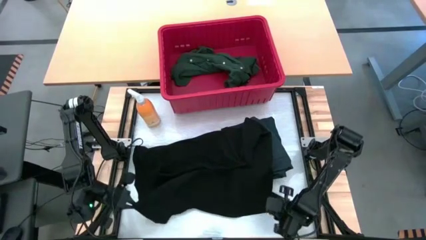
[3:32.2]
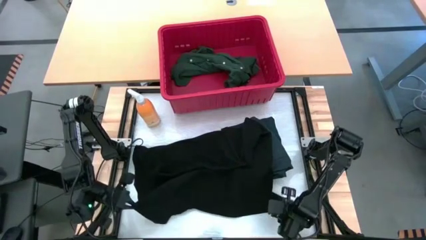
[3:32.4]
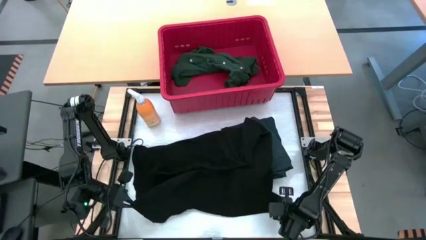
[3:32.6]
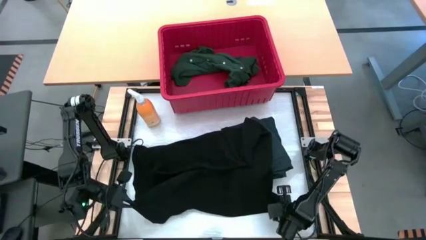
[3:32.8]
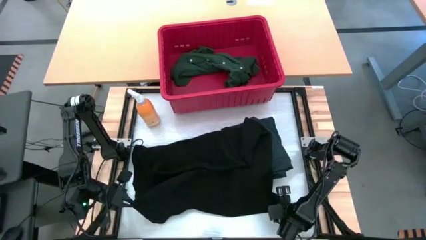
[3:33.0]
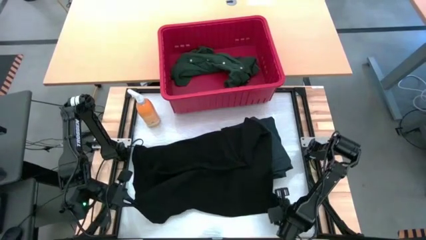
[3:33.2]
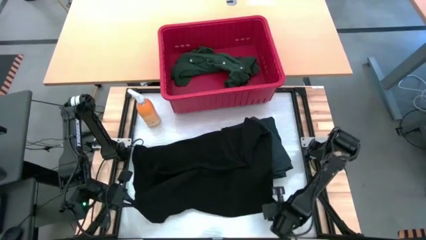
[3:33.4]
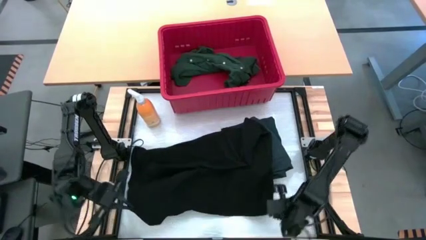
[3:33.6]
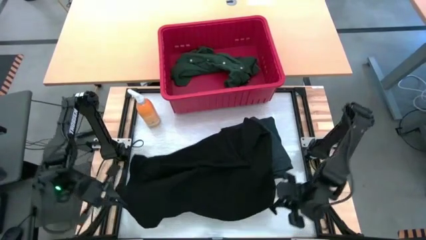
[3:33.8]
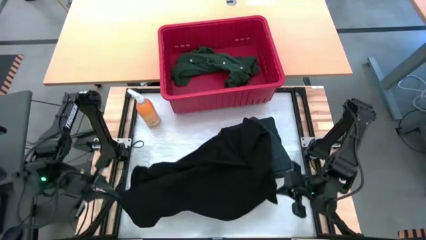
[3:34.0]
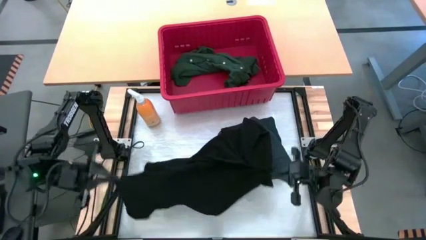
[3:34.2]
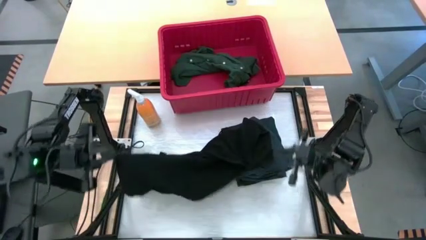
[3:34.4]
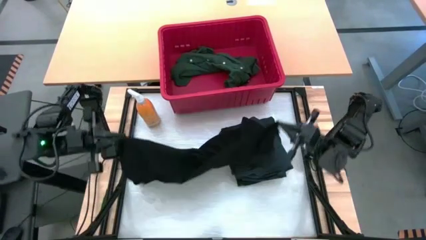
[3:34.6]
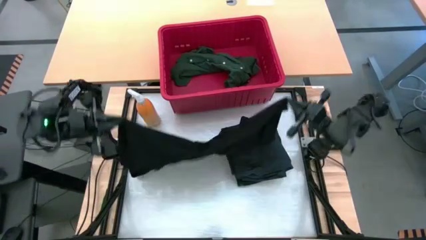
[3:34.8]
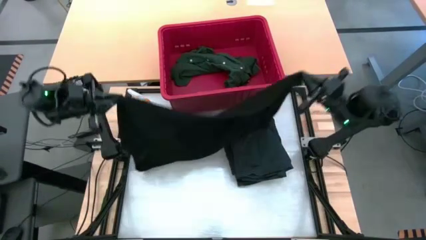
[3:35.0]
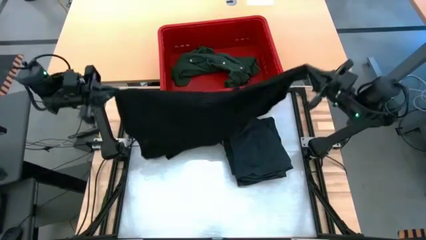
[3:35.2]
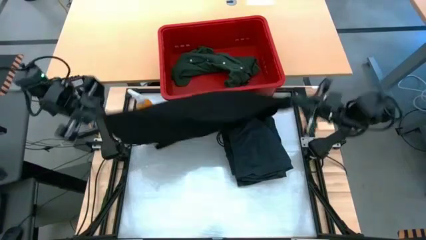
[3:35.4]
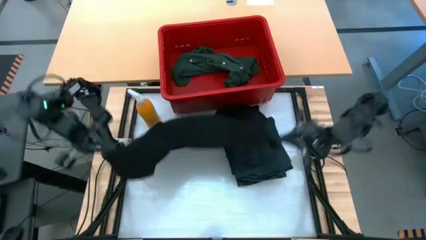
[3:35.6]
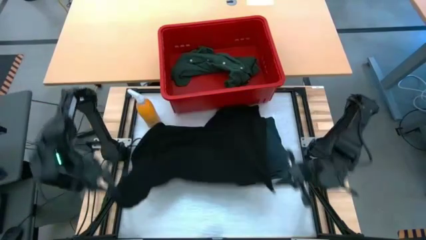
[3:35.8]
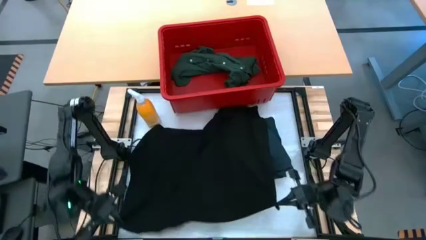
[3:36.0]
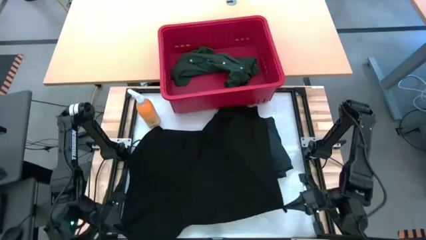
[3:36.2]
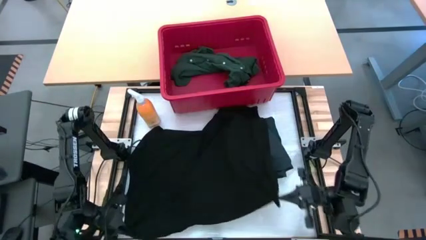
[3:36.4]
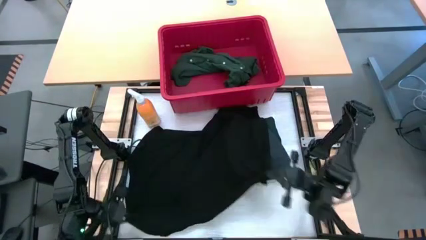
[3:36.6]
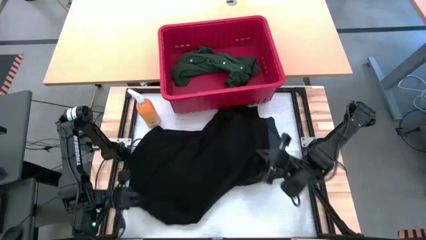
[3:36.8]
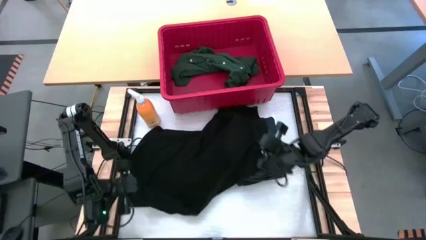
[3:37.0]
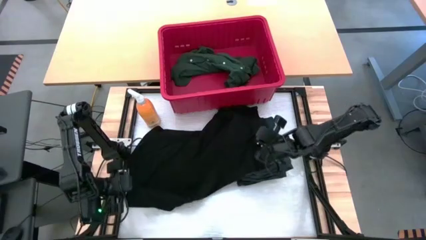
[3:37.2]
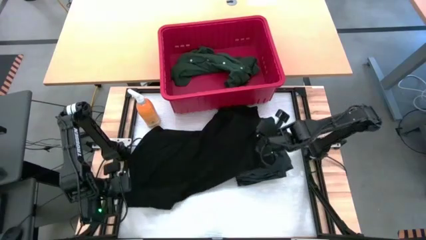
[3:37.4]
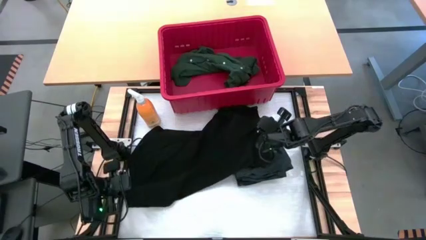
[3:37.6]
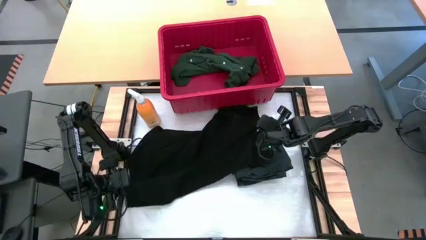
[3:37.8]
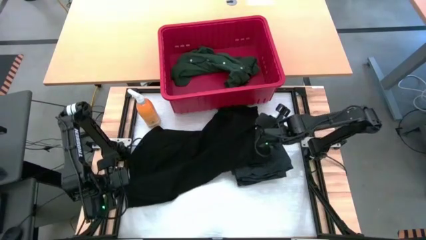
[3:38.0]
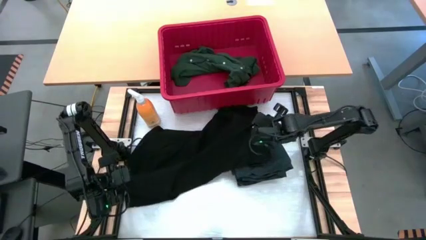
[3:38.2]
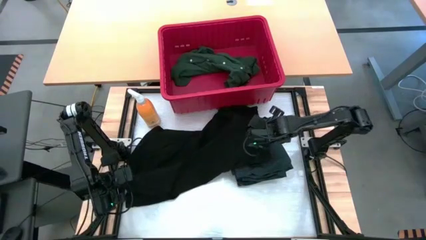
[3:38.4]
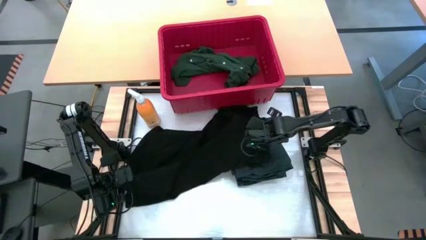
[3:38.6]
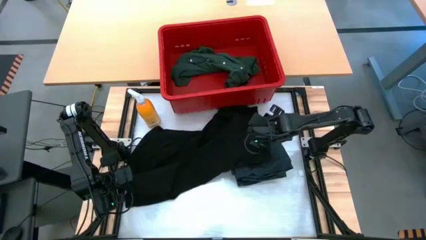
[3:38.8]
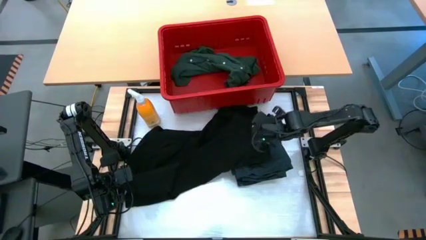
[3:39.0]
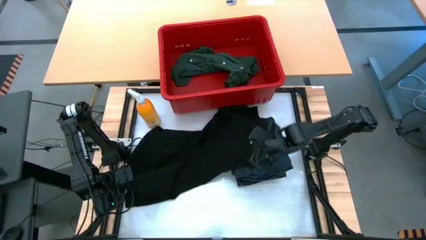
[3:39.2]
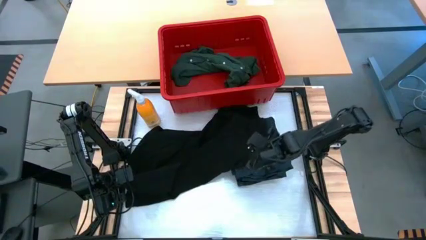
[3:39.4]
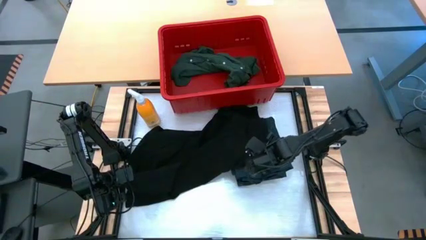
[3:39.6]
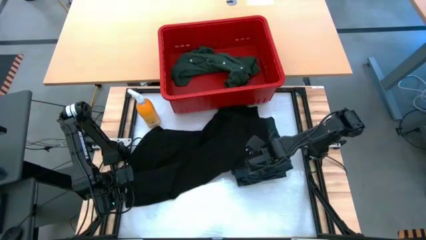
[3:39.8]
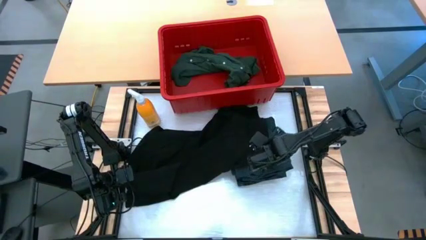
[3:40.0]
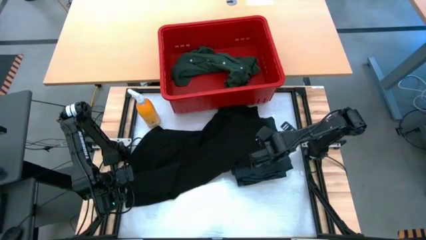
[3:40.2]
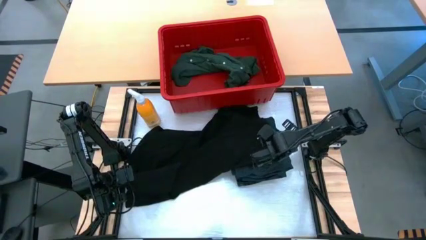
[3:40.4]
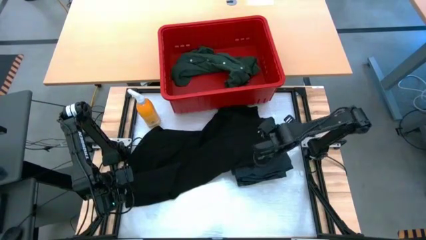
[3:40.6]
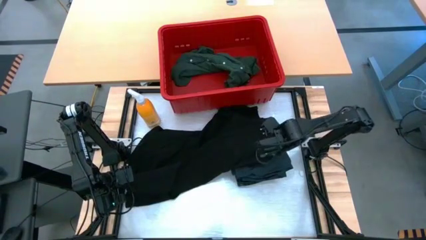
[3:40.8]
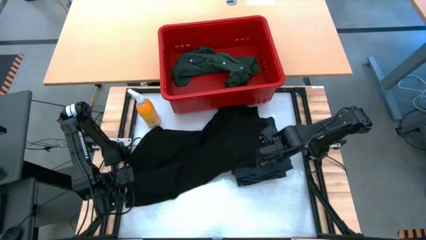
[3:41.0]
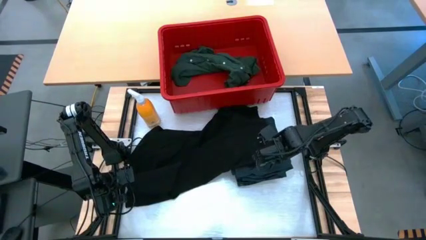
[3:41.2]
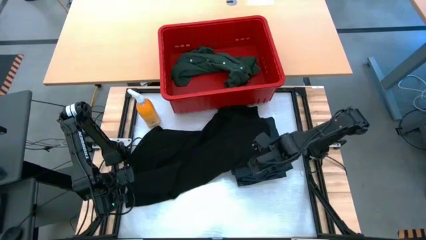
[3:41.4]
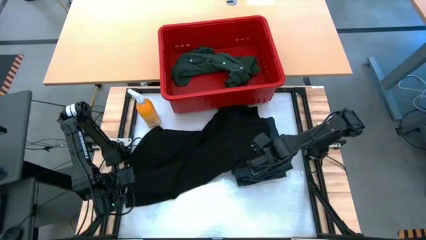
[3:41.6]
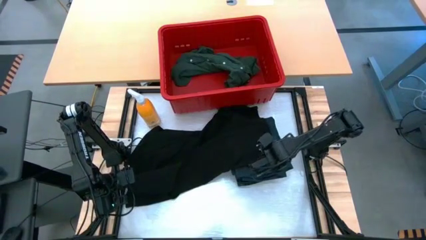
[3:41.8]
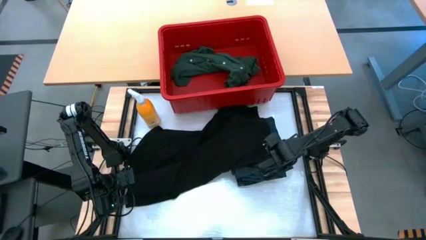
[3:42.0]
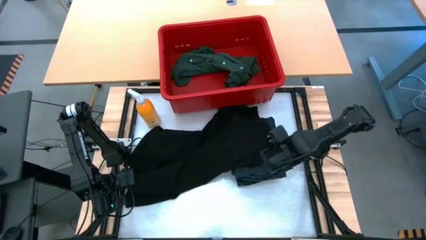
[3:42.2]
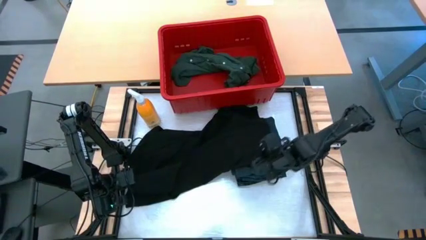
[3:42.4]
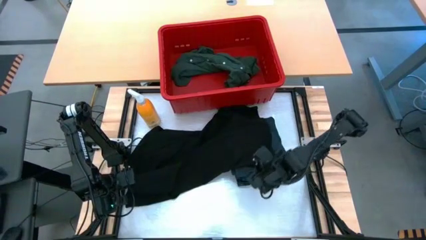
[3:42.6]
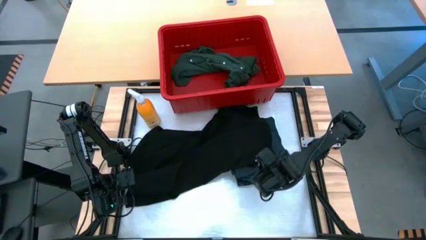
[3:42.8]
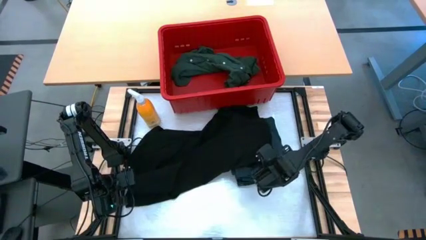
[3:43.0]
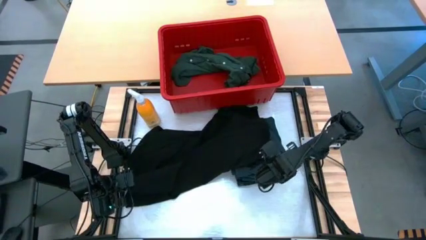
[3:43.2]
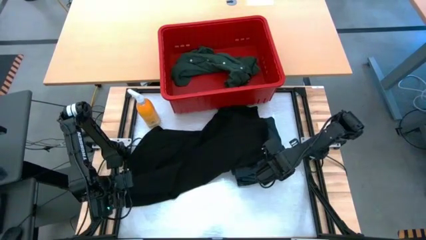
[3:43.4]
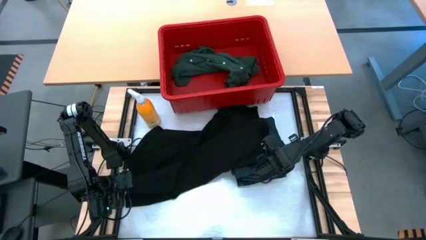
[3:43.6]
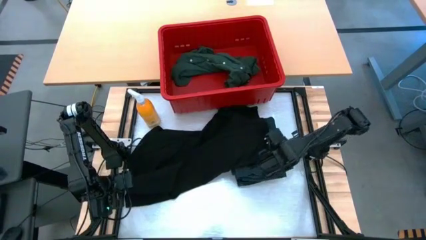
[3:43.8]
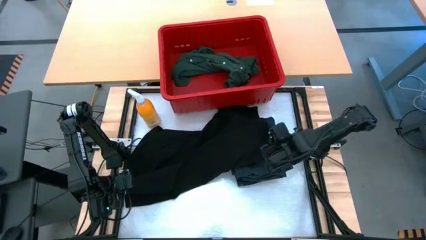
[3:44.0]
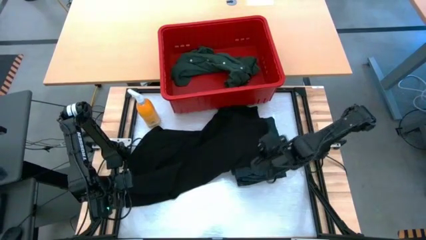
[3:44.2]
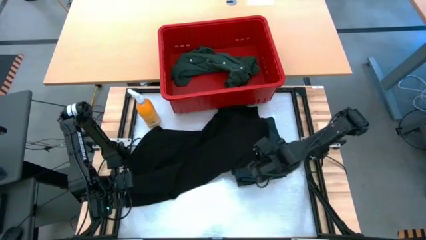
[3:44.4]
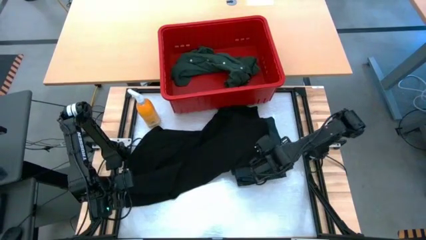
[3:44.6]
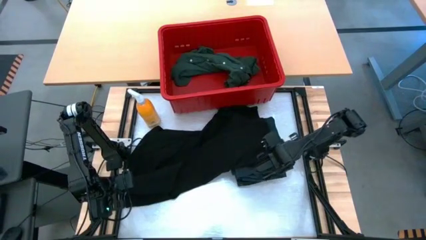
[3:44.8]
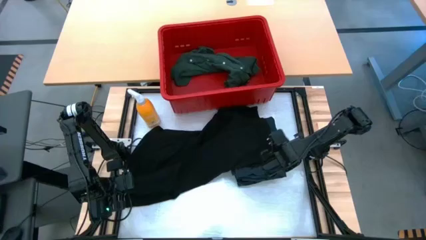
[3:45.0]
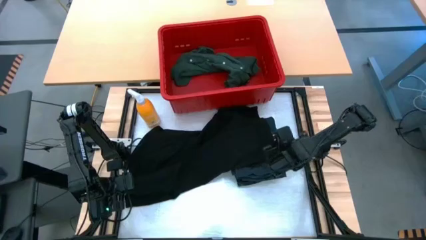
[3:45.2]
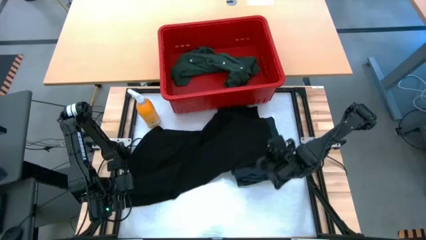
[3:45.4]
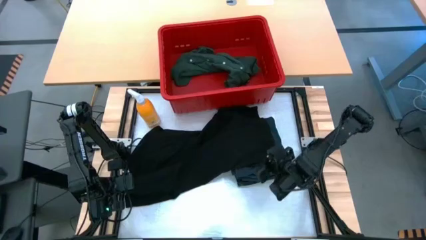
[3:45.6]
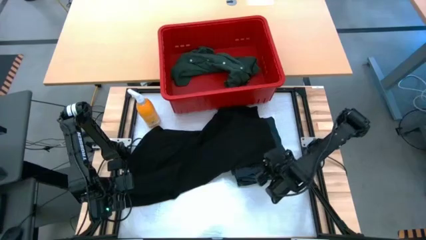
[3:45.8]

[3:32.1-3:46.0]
Task: Fold Laundry from Bin
Fold the black shirt
